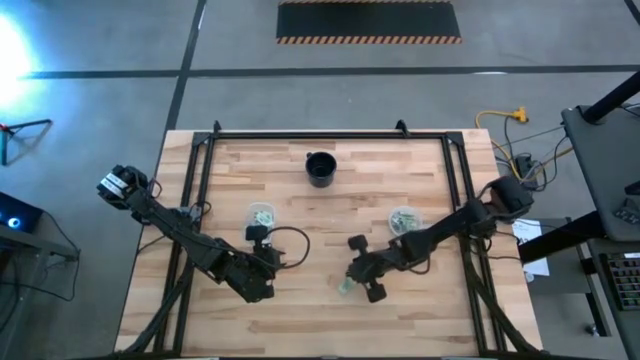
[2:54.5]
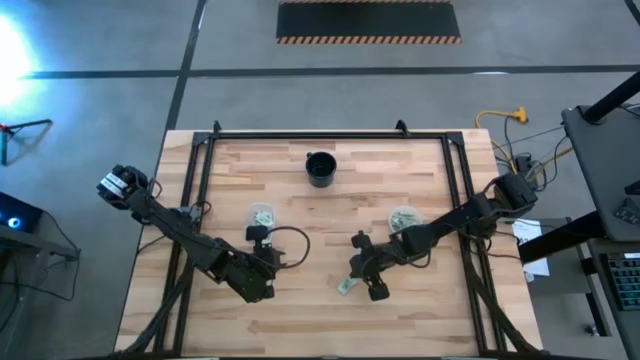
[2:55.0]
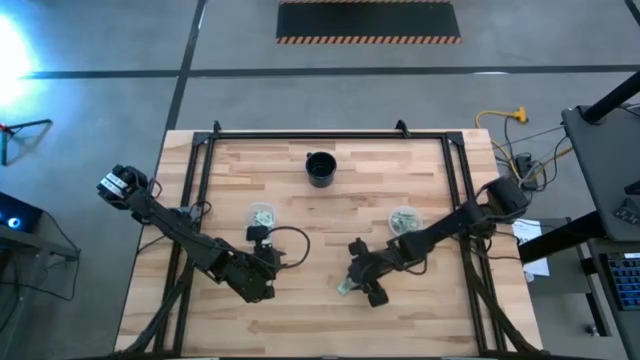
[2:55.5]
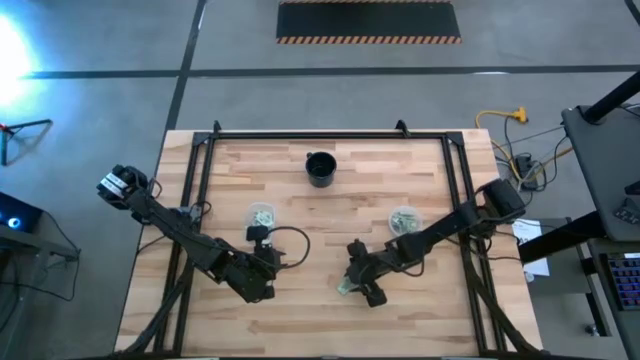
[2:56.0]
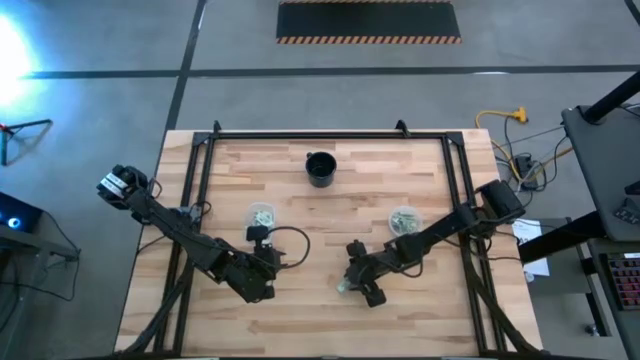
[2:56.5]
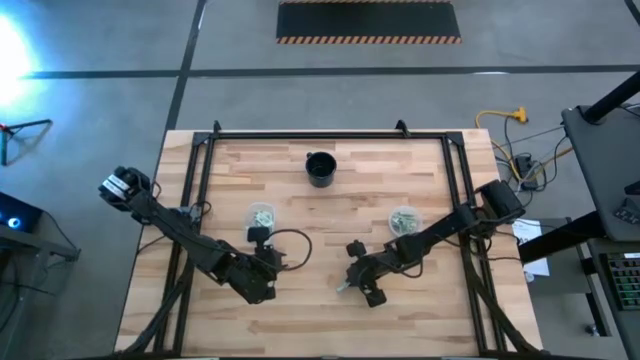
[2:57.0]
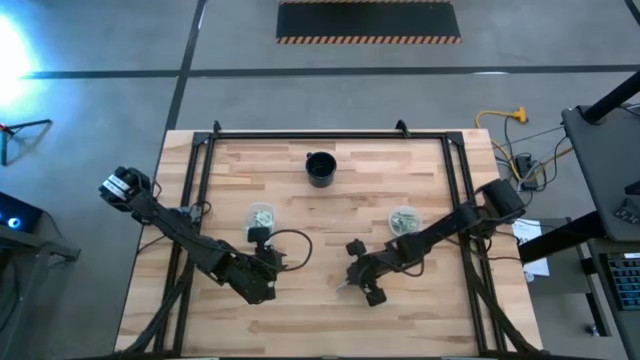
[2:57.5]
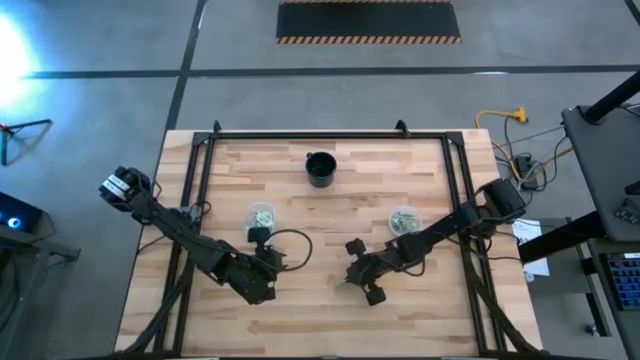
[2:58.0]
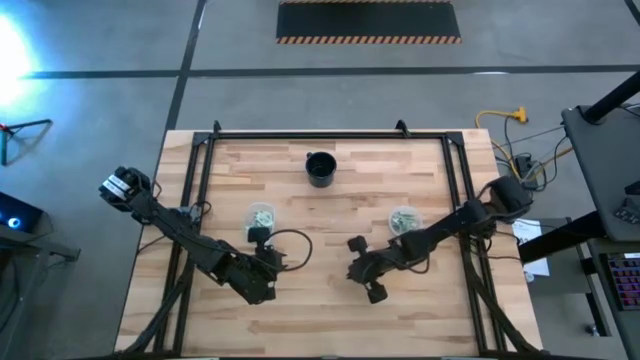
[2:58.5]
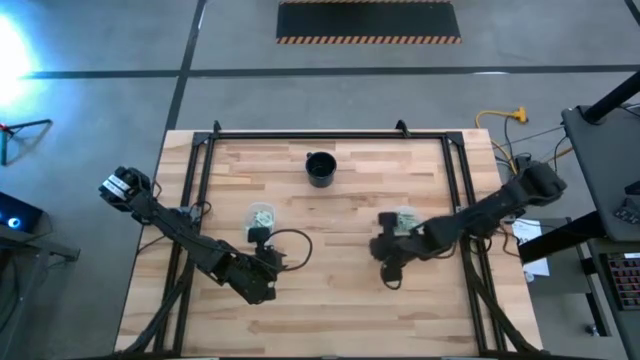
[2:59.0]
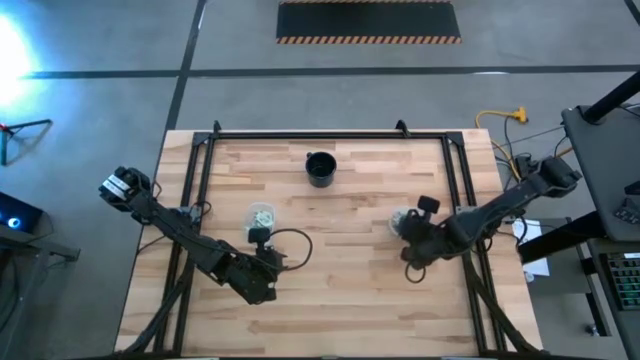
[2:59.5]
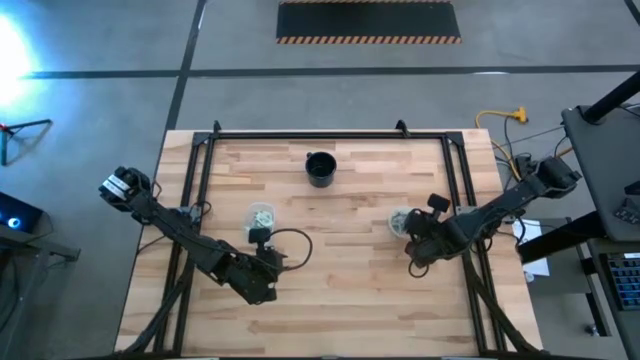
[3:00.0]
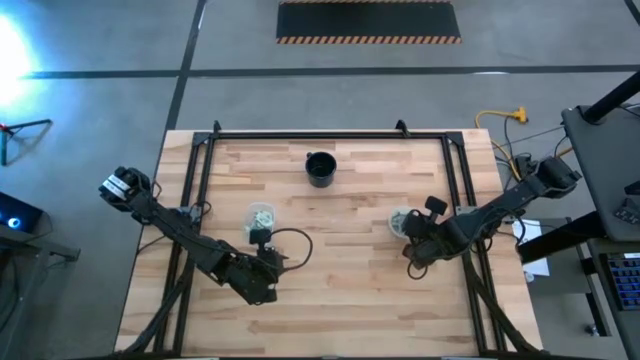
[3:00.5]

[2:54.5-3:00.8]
Task: Pick and place Stevia / Truvia into bins
Put the light green stevia packet into the circular container

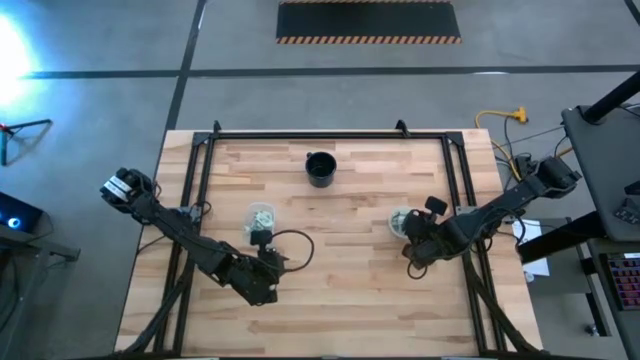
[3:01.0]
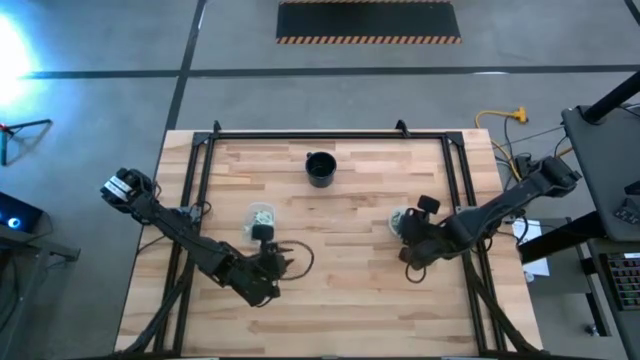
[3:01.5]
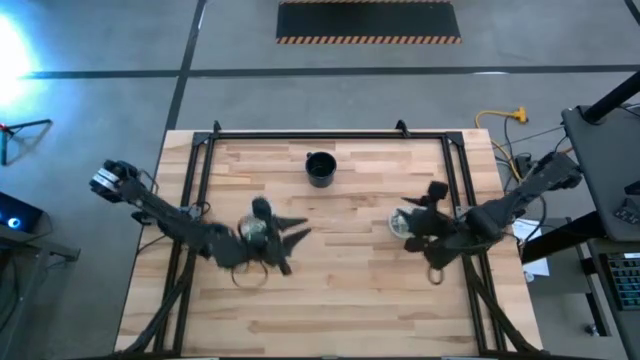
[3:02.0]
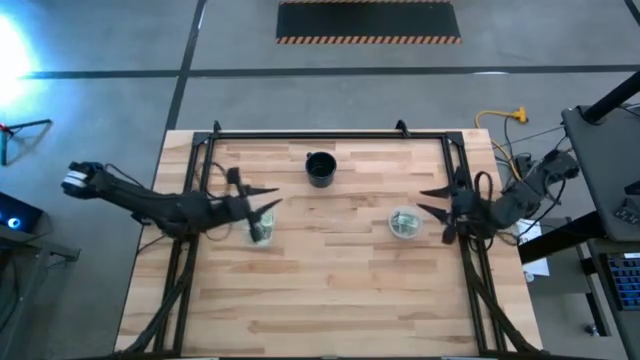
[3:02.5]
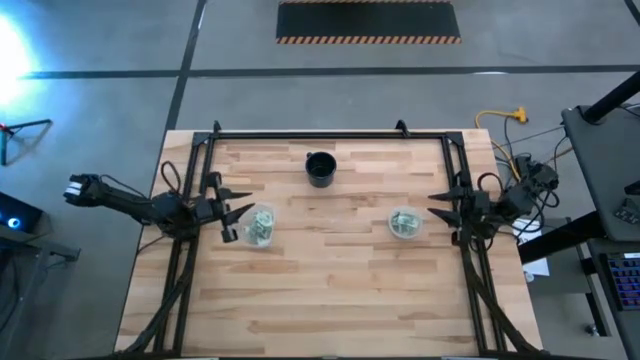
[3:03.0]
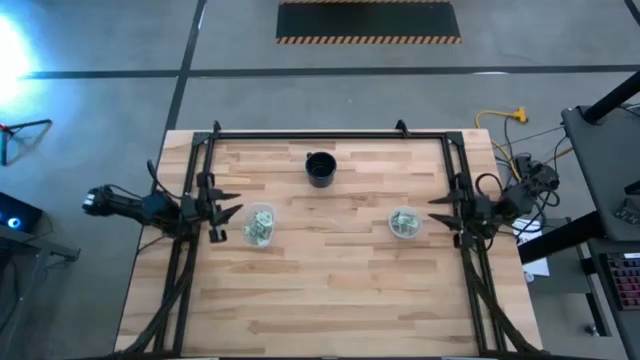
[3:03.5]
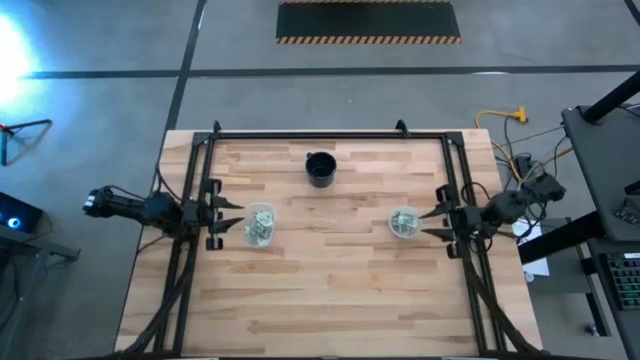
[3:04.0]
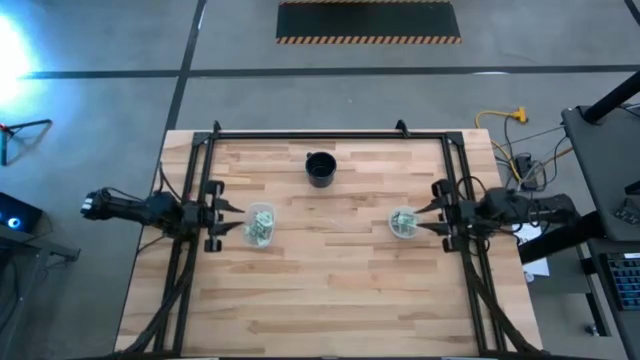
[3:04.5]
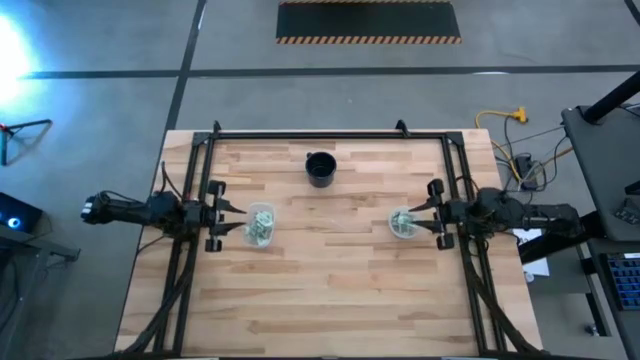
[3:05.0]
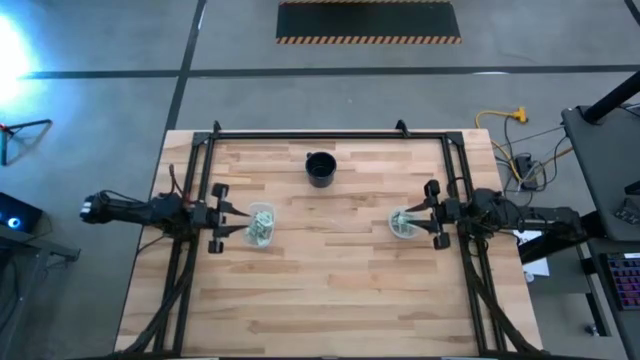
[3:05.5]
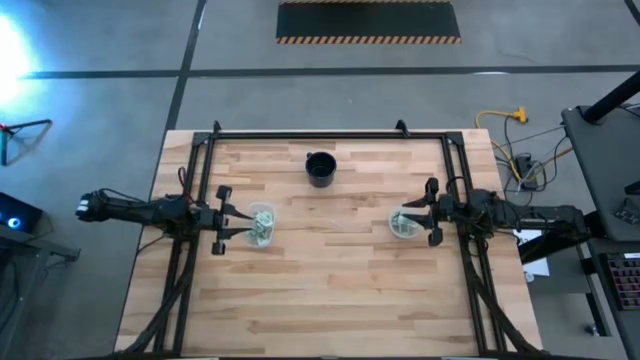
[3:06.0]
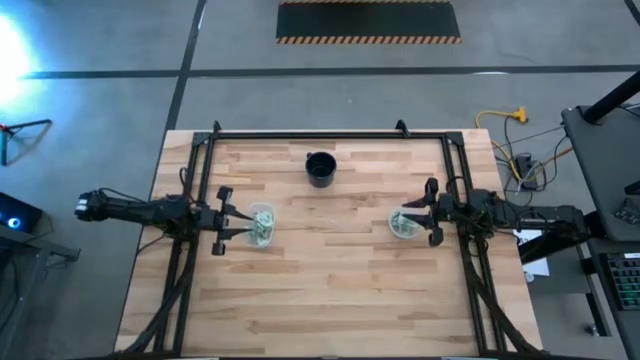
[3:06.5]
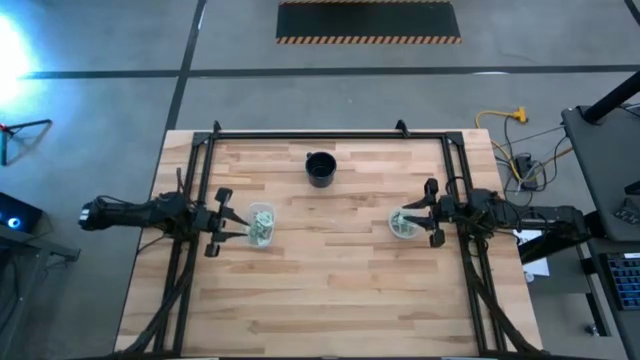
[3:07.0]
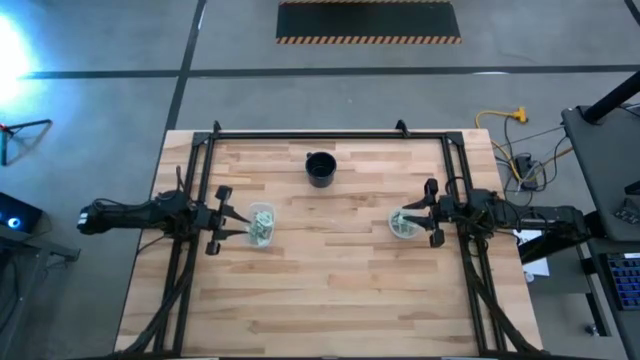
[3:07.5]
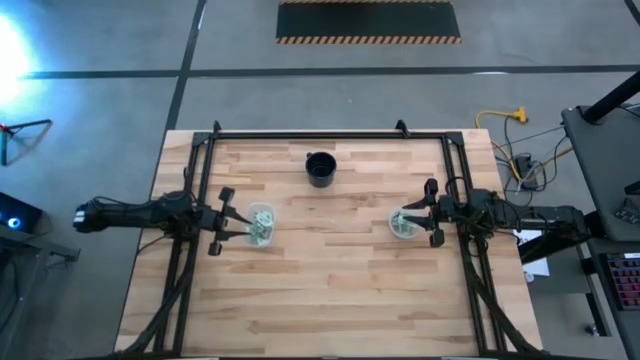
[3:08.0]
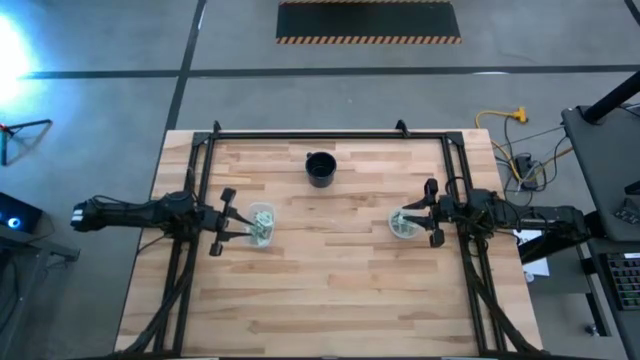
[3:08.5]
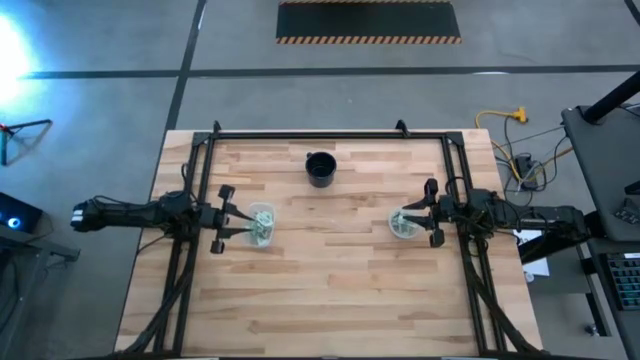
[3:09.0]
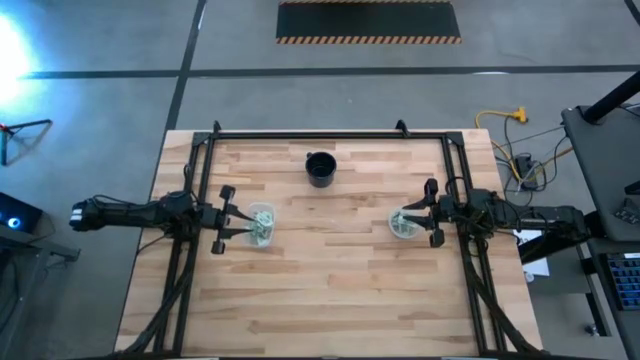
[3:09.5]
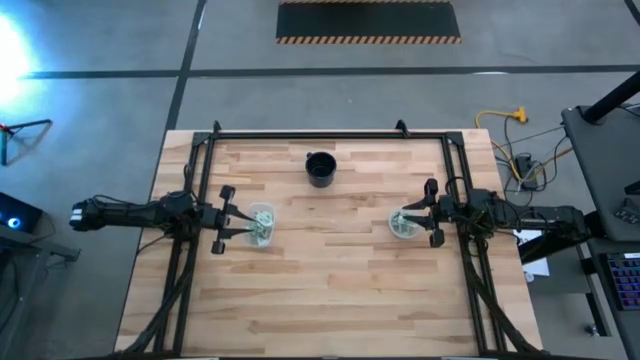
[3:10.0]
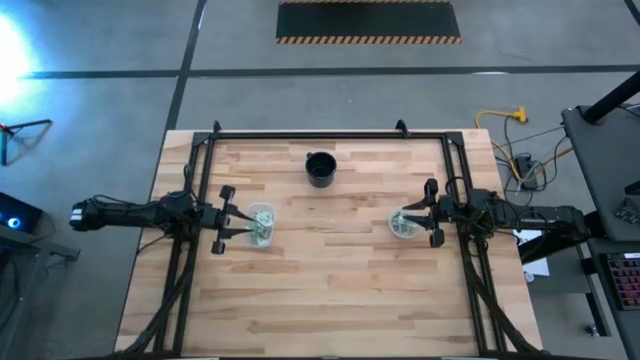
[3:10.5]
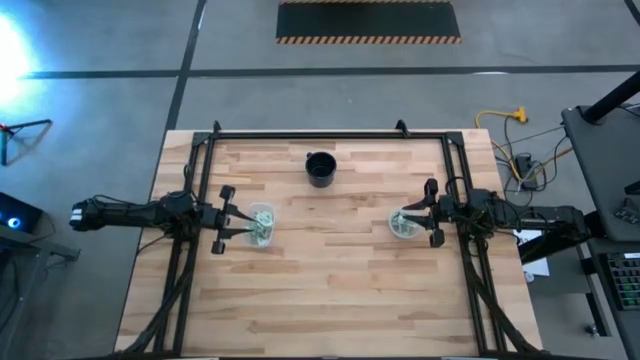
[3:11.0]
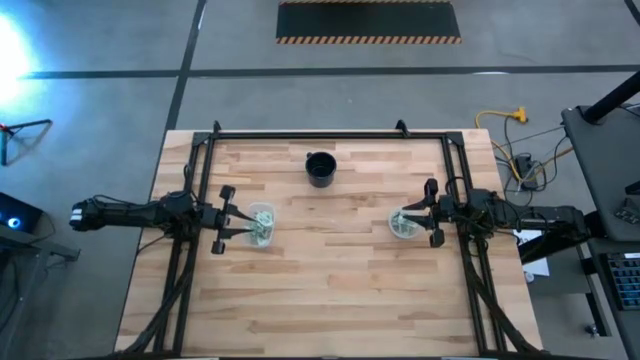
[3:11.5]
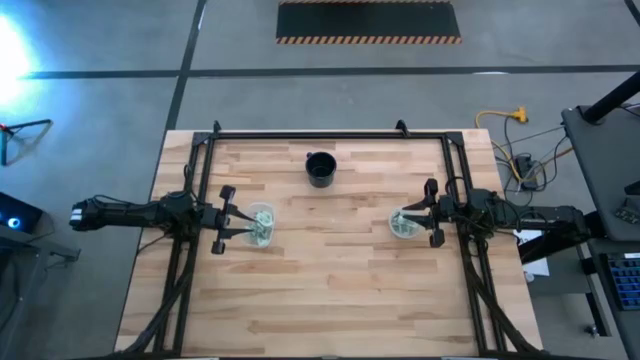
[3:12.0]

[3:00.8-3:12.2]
Return to Home Position

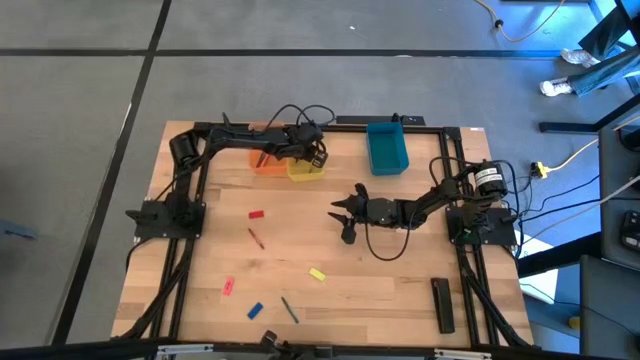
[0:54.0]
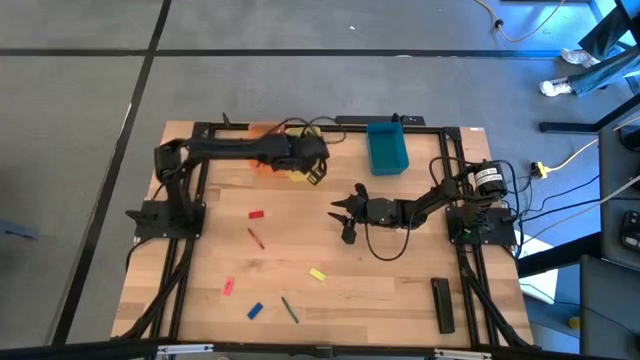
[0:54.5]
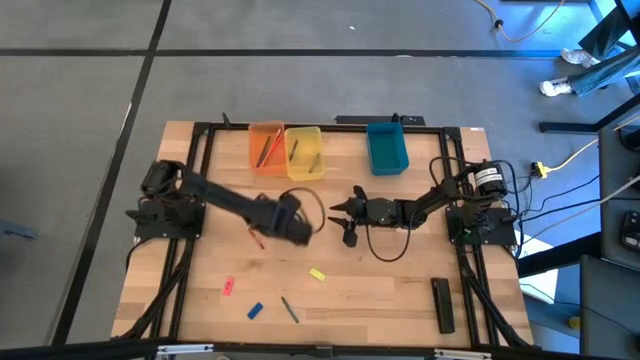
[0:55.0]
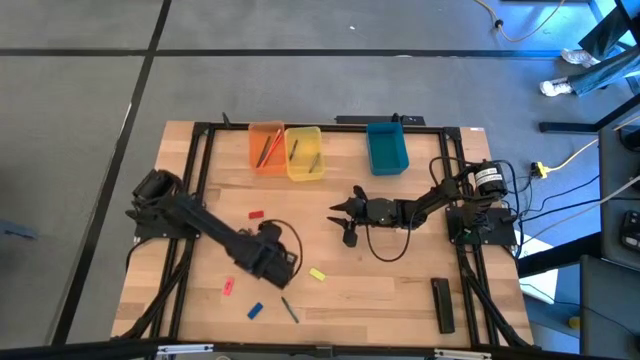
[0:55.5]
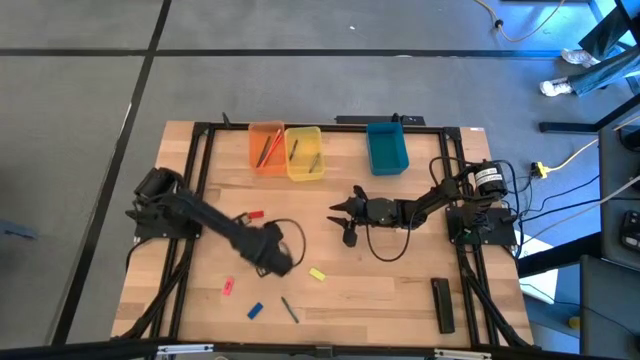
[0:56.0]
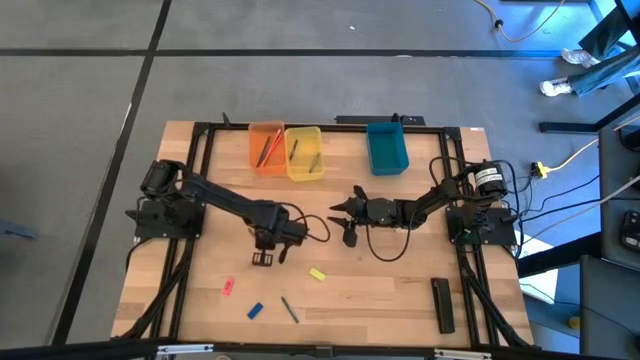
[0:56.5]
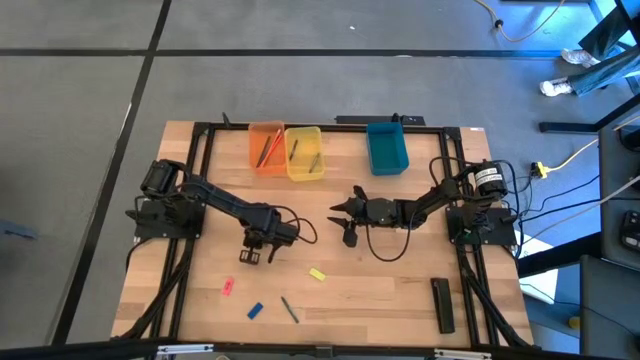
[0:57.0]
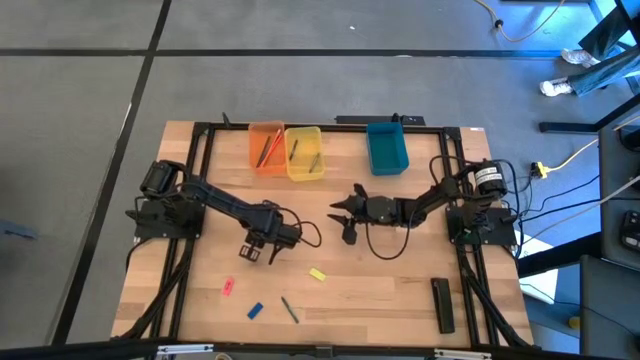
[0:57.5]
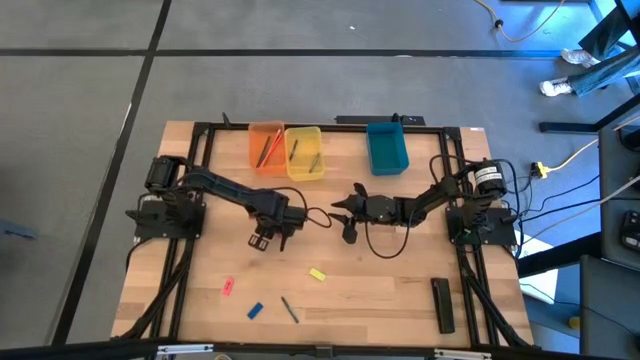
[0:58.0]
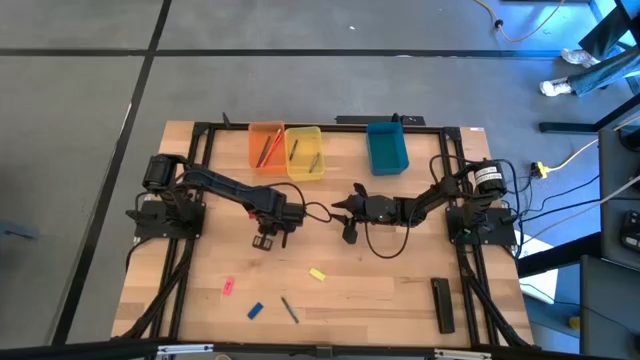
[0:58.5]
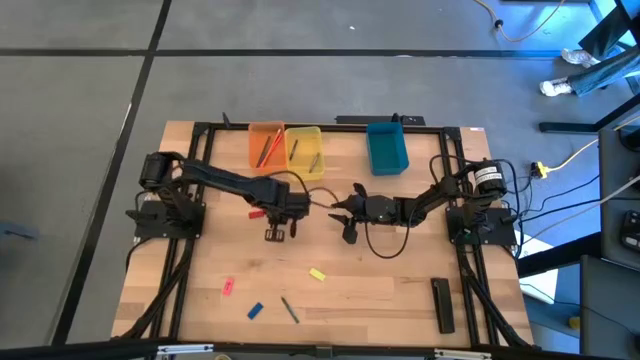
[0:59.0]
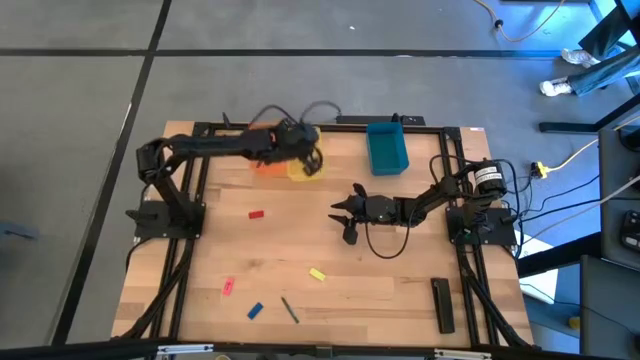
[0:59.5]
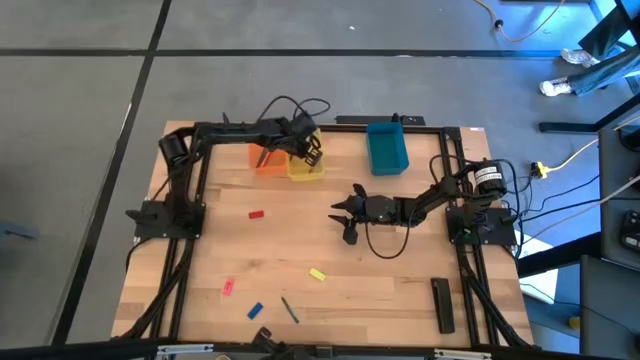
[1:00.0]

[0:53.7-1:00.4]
Task: Sort crayons/erasers/pens/pencils in bins
Put the red crayon into the yellow bin
